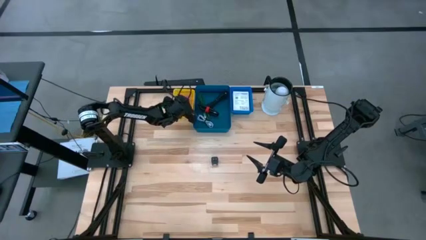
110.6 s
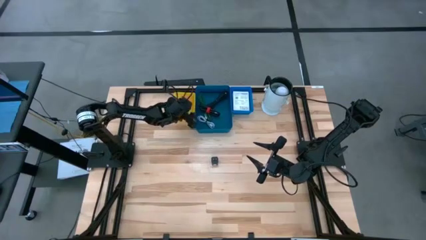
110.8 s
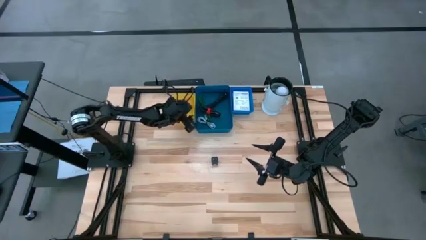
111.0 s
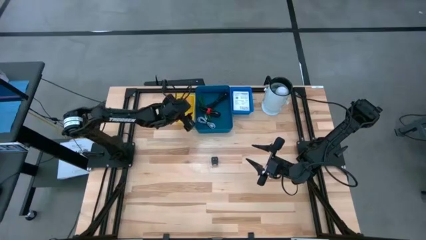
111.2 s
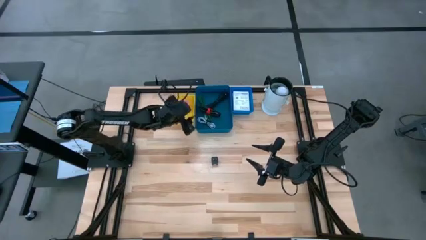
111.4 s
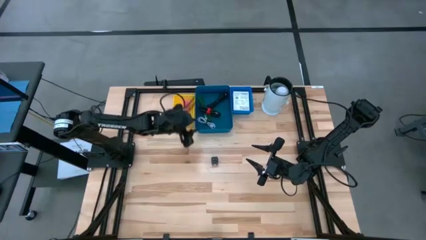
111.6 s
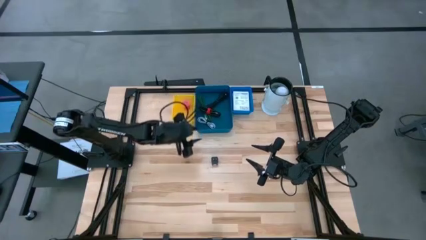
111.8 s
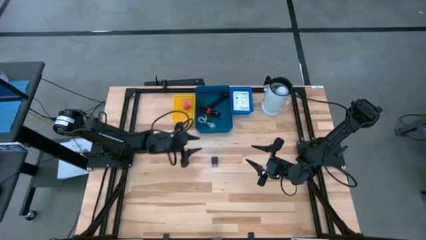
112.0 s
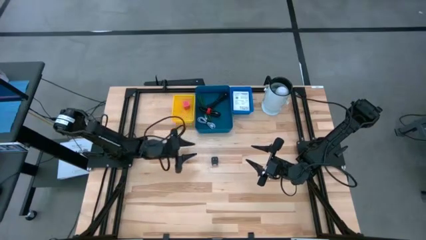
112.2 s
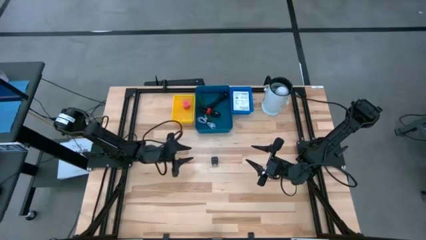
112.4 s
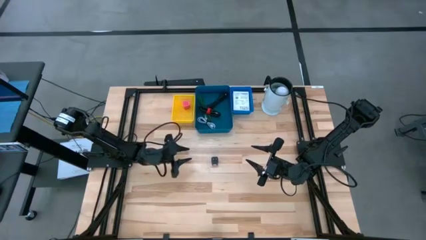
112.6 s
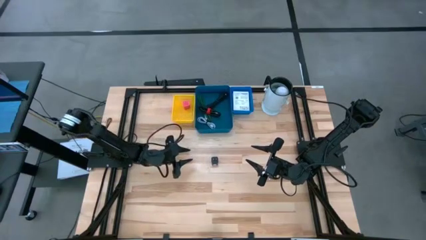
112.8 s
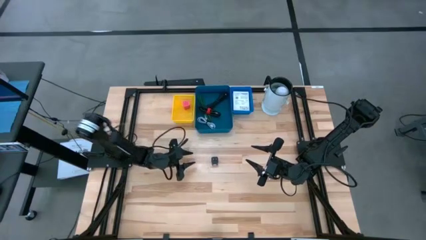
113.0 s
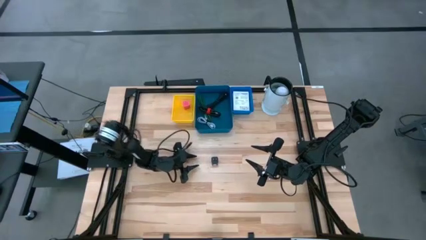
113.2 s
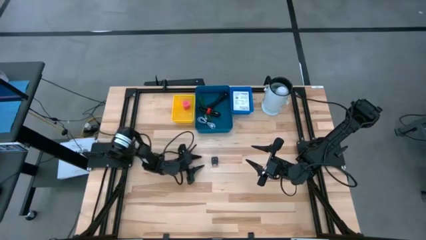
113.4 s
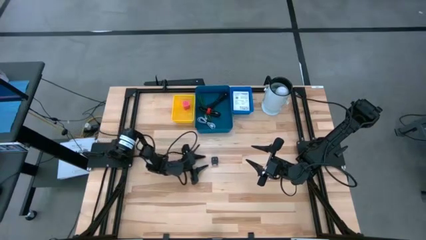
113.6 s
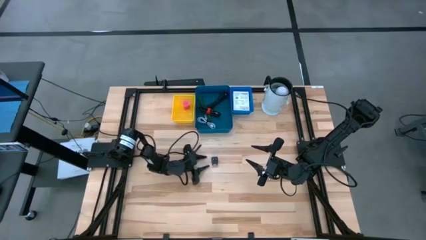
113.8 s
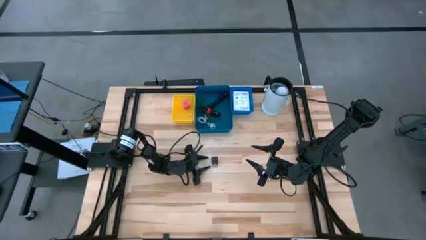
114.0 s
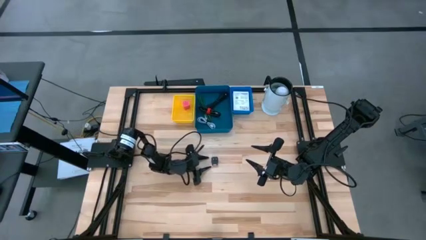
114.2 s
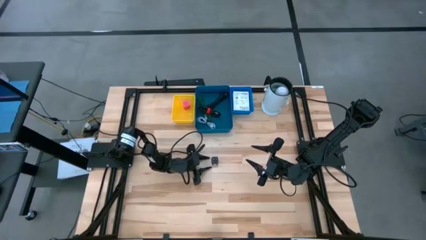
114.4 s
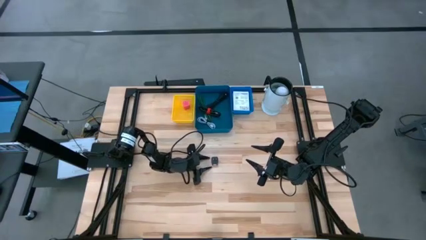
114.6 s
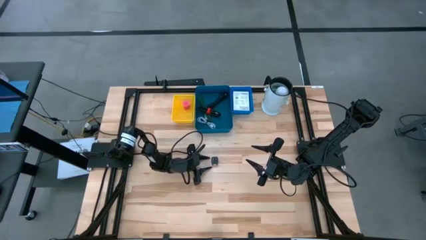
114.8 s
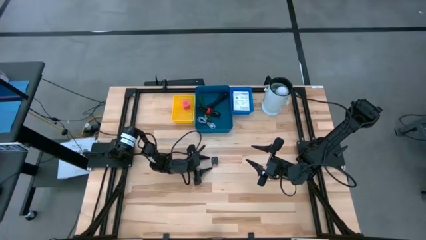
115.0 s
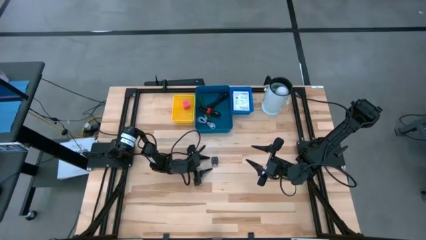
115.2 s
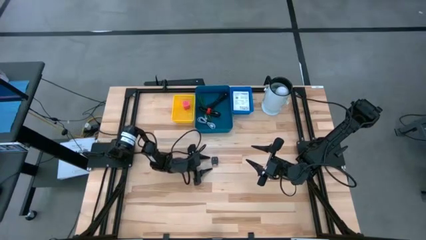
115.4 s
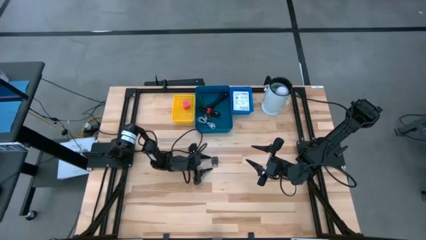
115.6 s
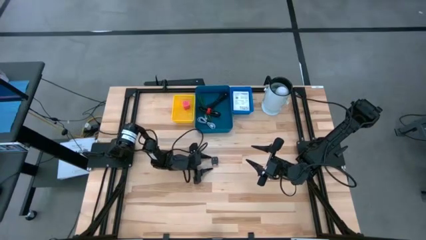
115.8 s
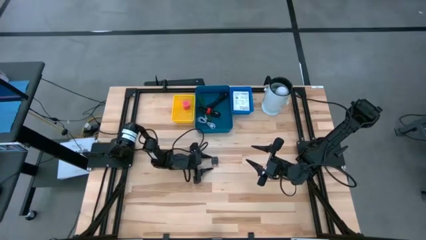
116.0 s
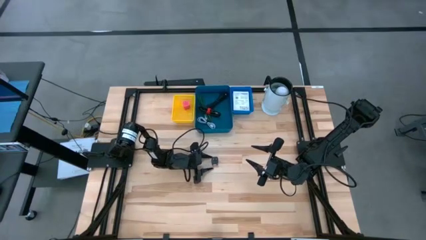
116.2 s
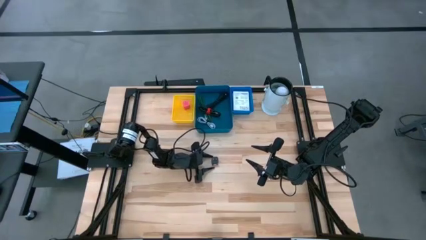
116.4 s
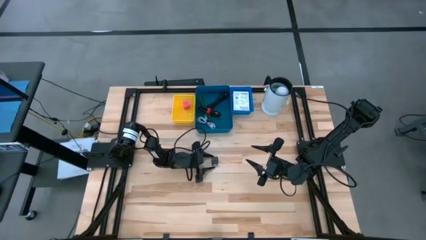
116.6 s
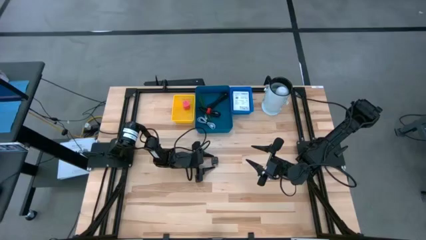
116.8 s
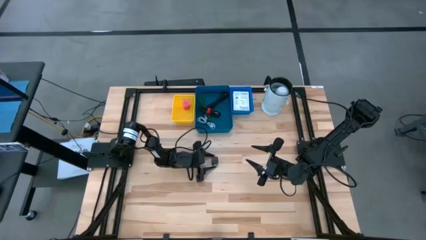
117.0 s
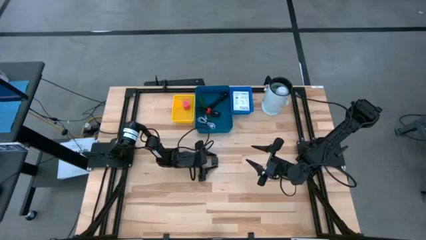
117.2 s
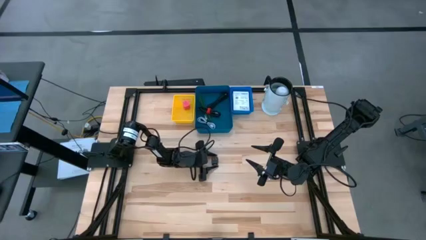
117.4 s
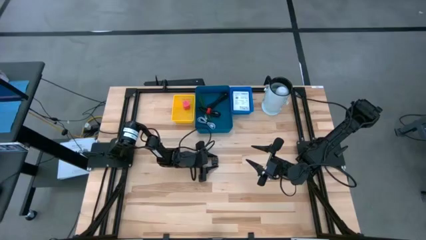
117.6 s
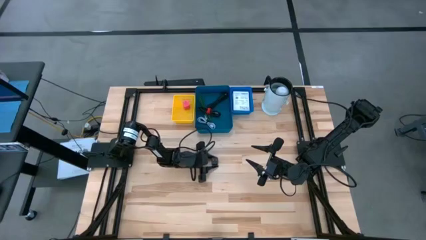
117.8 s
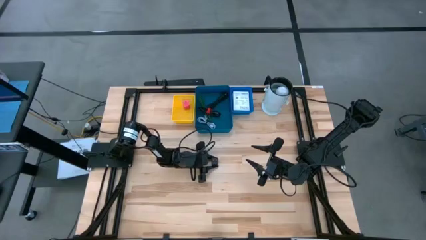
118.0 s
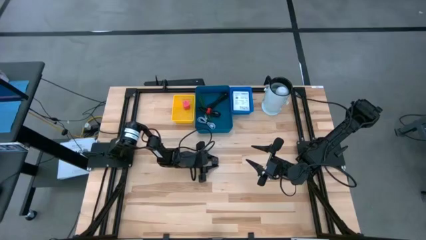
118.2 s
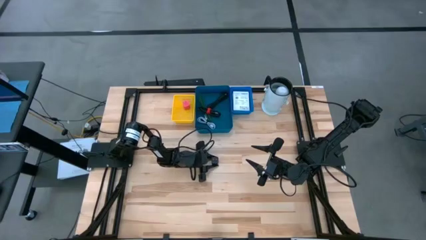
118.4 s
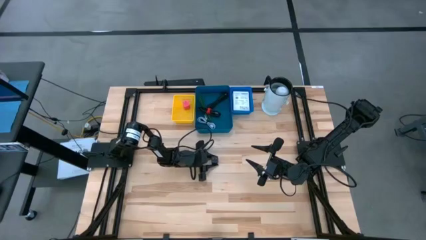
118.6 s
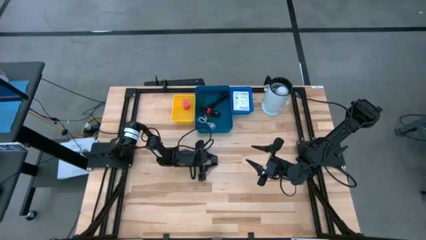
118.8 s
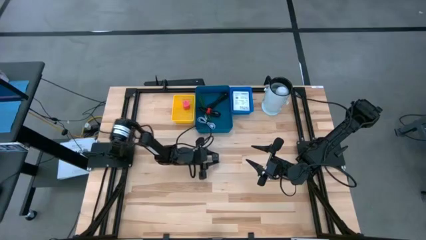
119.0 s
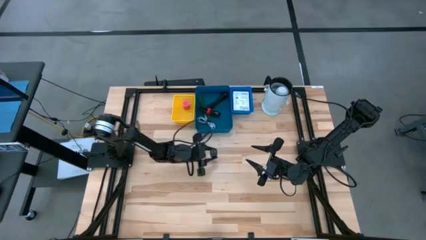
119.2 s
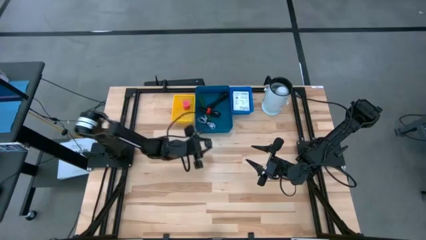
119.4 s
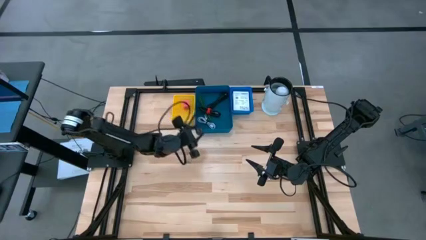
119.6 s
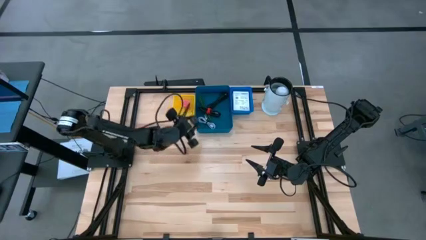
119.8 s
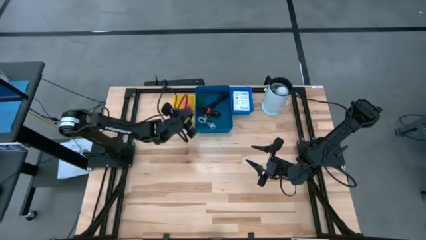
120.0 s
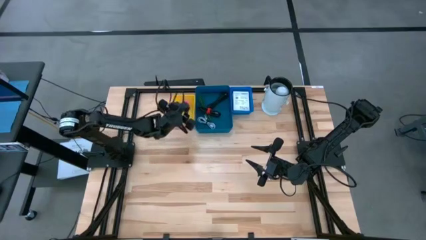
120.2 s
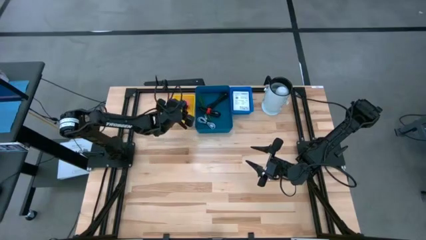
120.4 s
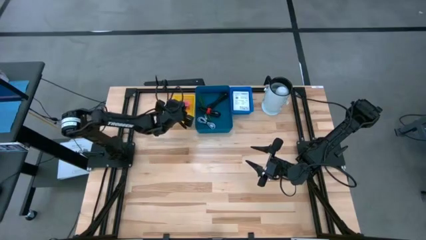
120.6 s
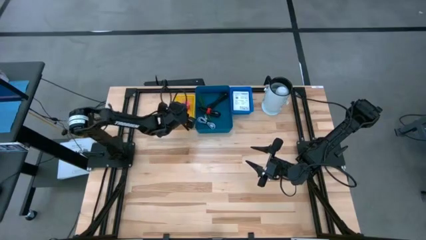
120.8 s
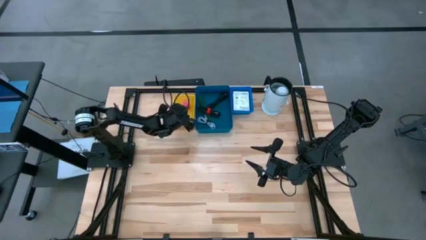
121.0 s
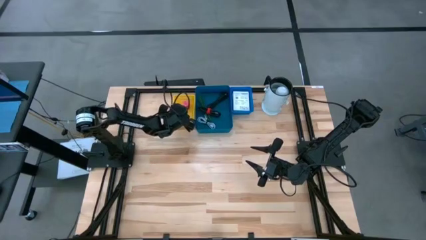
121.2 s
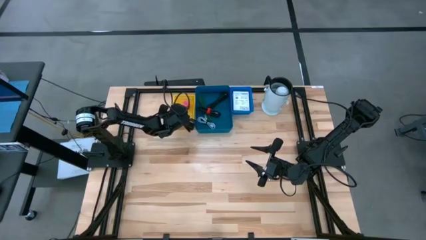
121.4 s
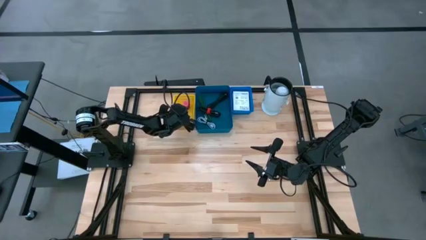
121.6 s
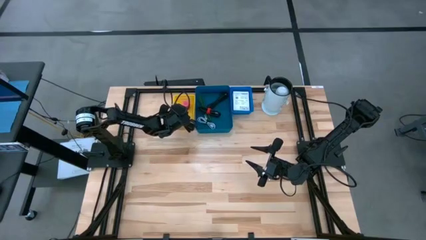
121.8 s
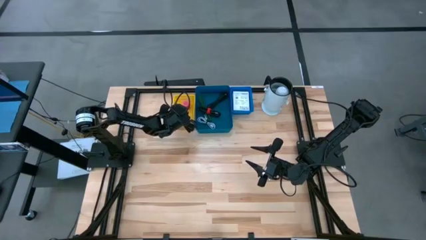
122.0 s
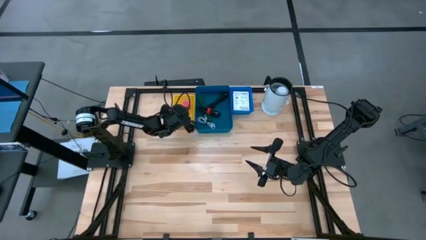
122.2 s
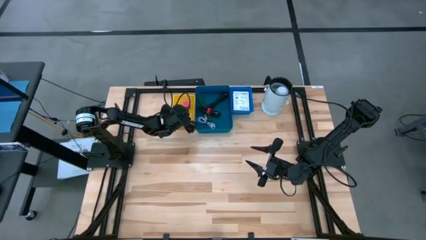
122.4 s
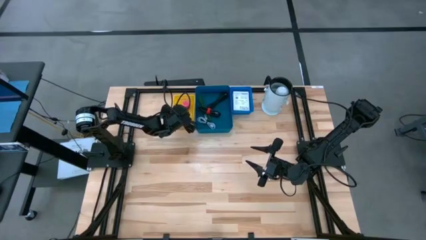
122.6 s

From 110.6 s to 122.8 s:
Task: Pick and place items into bin
Put the black charger adapter into the yellow bin

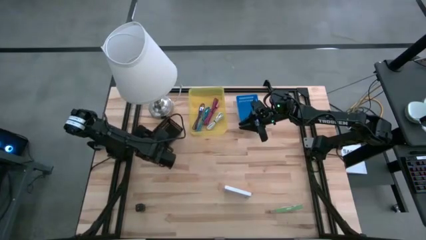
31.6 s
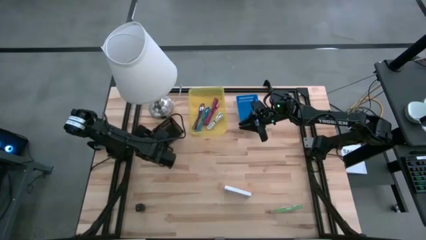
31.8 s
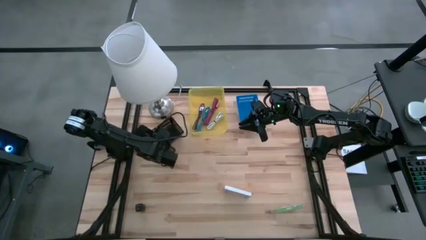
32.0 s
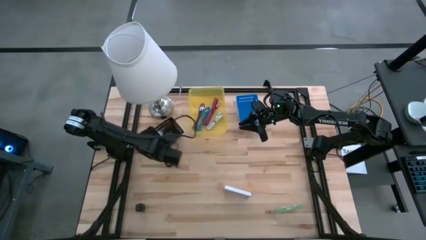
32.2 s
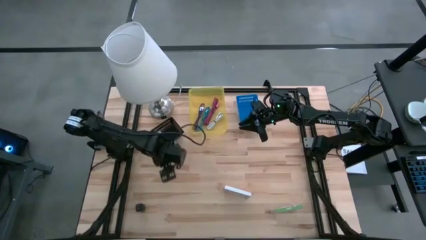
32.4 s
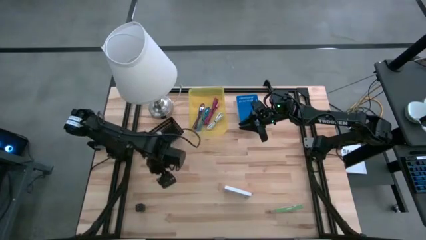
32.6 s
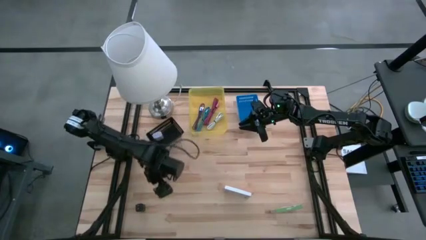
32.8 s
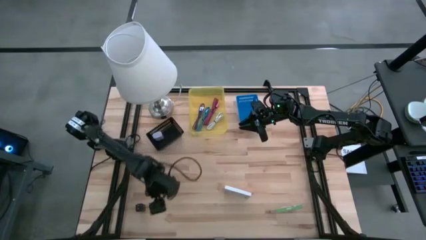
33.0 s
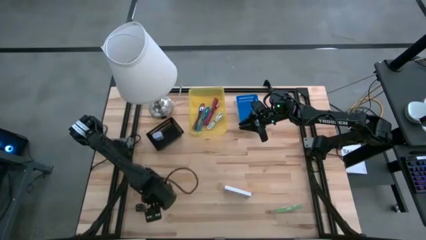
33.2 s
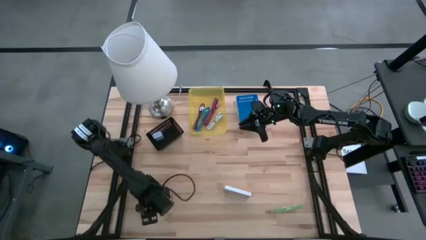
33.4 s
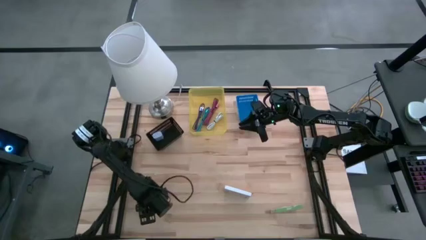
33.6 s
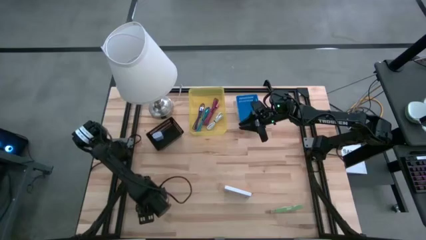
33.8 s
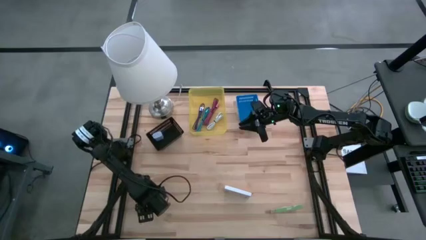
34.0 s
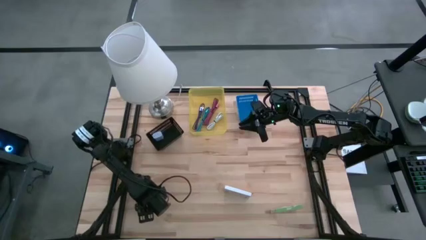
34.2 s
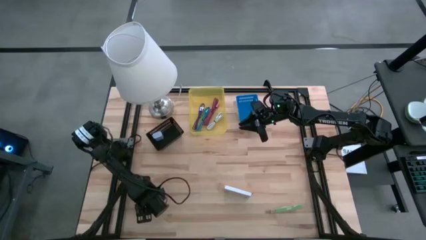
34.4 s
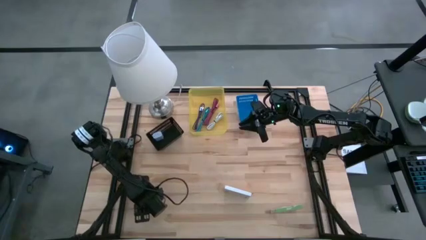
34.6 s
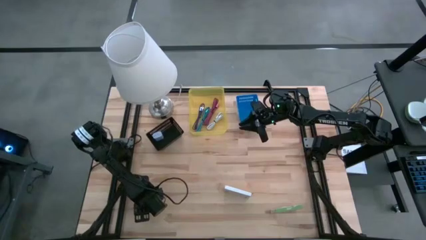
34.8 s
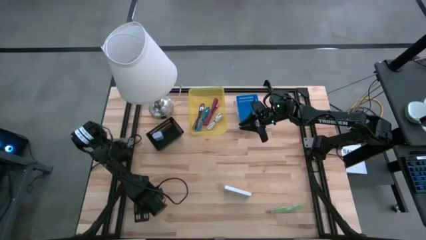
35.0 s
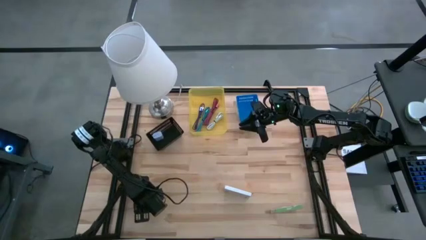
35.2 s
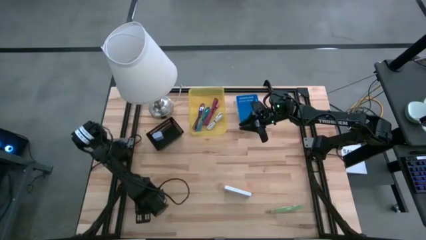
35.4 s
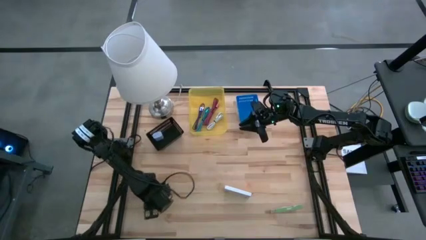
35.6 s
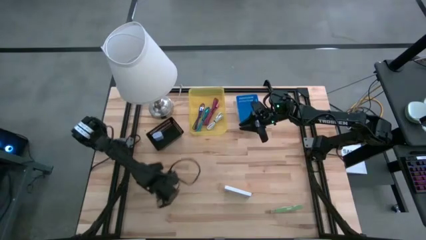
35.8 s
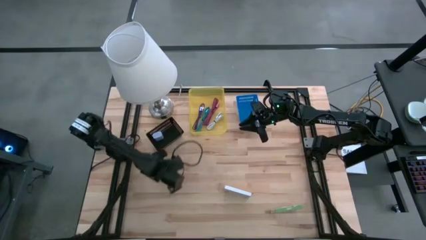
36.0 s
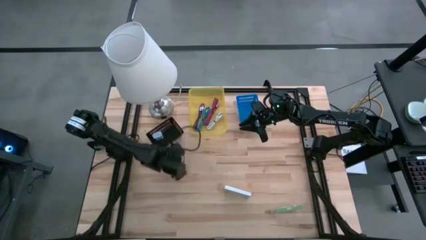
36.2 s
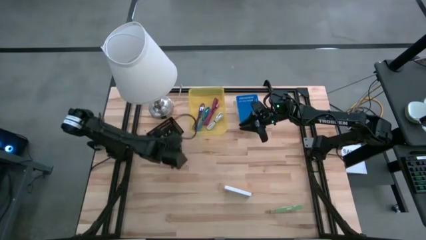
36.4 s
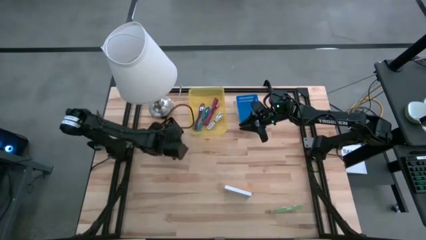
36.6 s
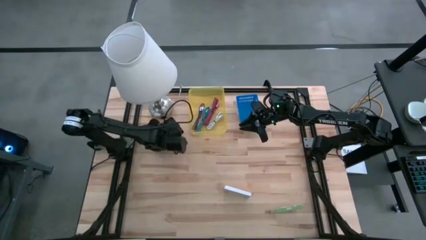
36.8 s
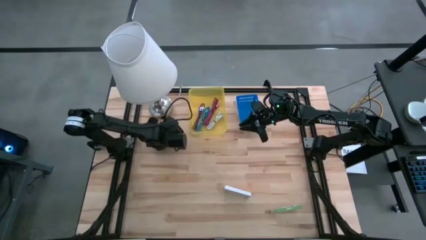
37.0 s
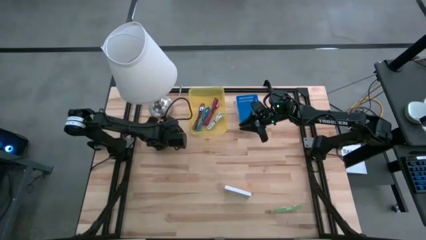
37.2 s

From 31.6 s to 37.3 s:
Task: Pick and place items into bin
Put the black charger adapter into the black bin
